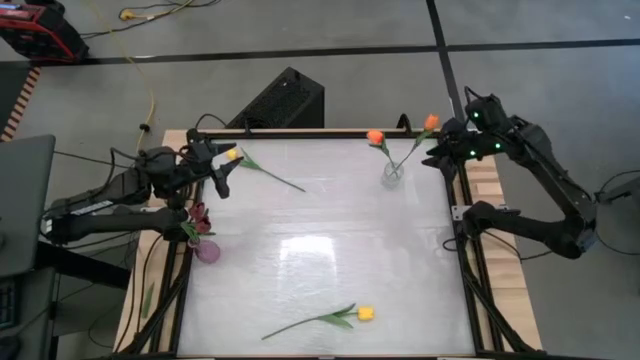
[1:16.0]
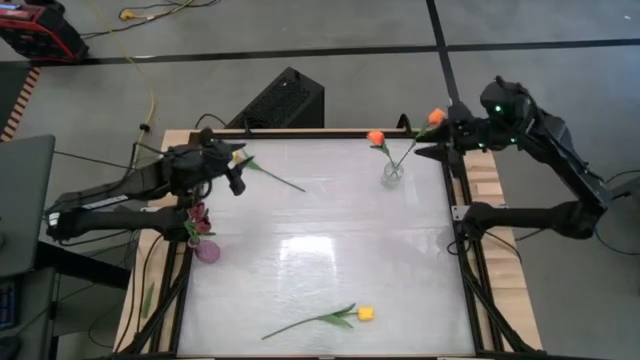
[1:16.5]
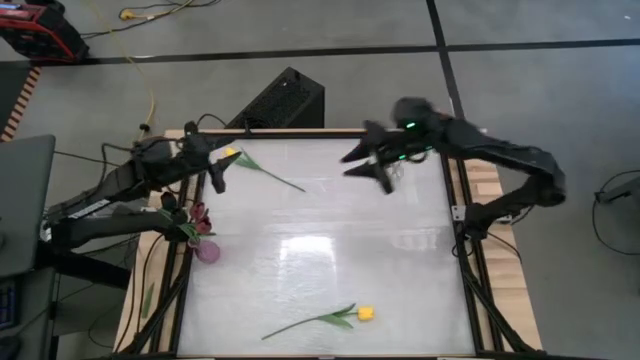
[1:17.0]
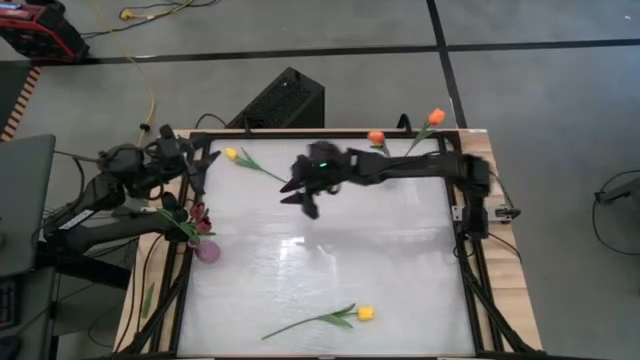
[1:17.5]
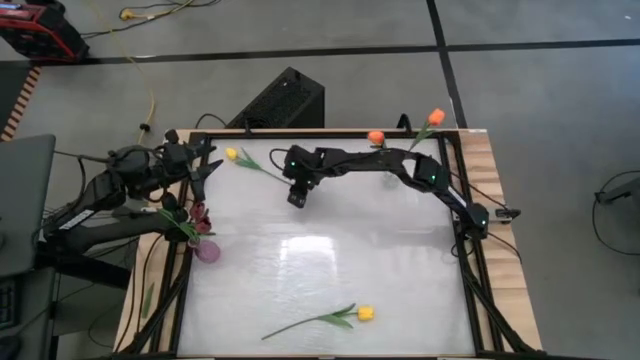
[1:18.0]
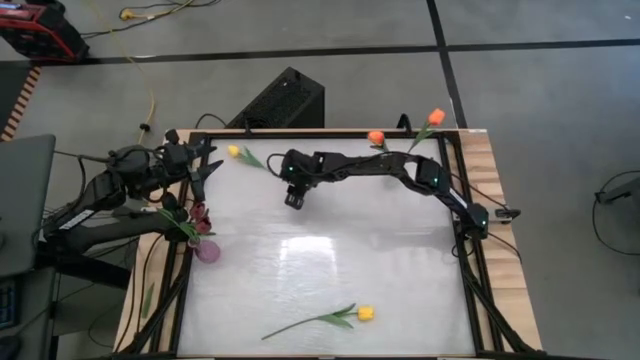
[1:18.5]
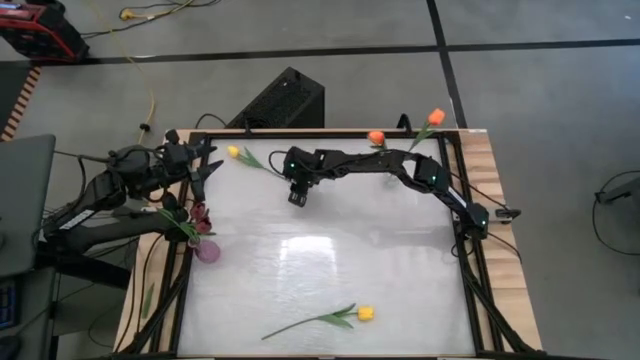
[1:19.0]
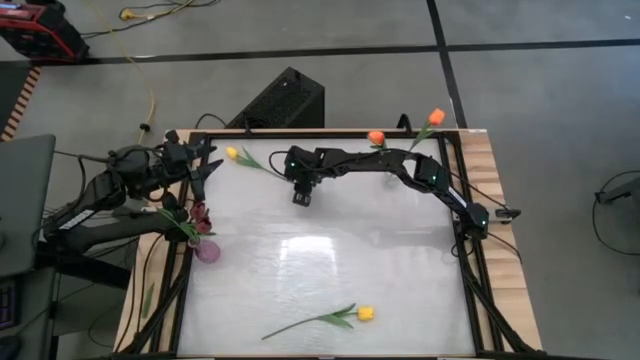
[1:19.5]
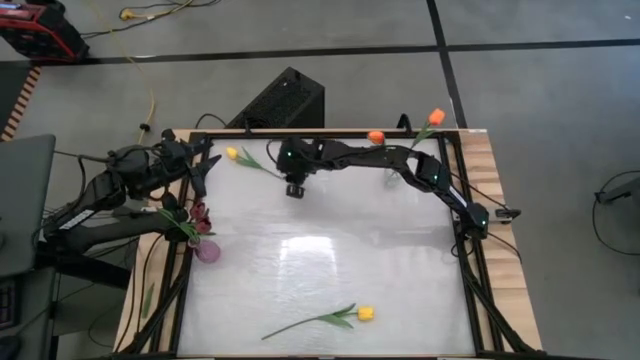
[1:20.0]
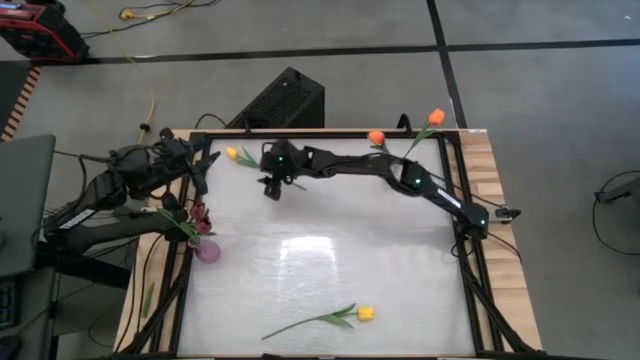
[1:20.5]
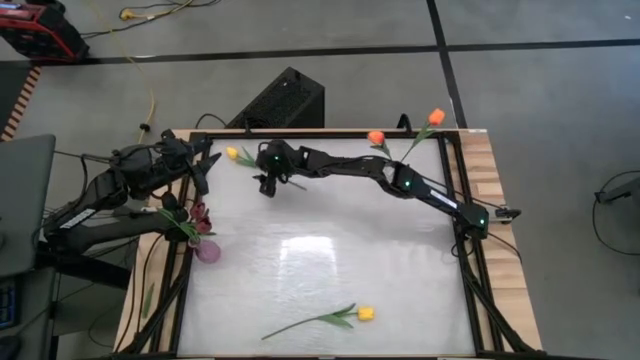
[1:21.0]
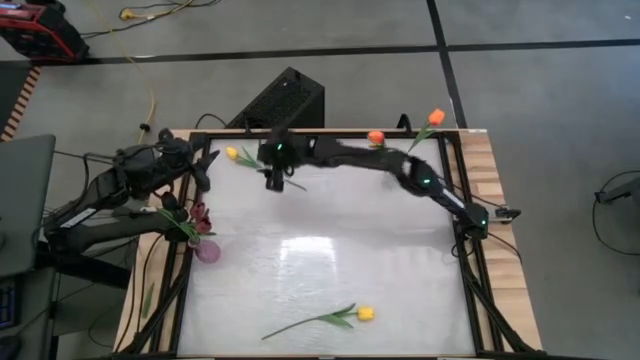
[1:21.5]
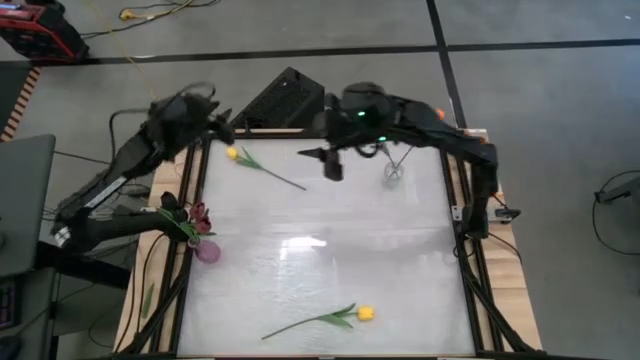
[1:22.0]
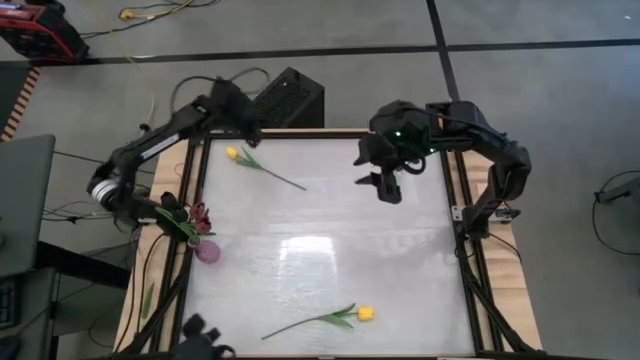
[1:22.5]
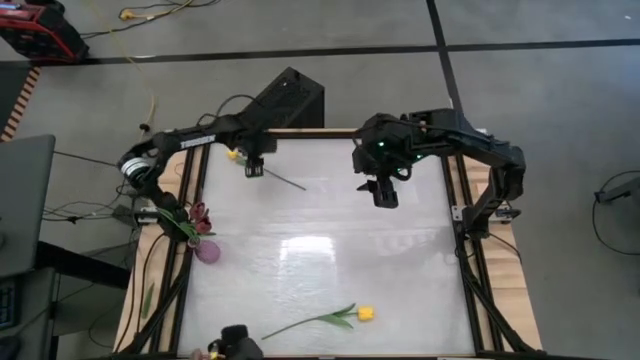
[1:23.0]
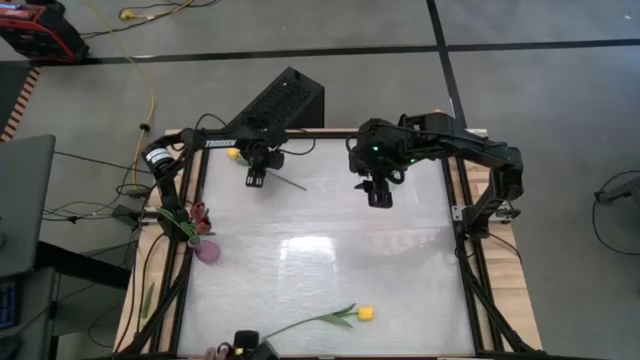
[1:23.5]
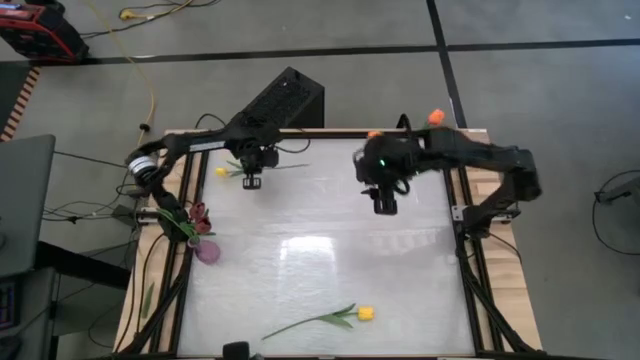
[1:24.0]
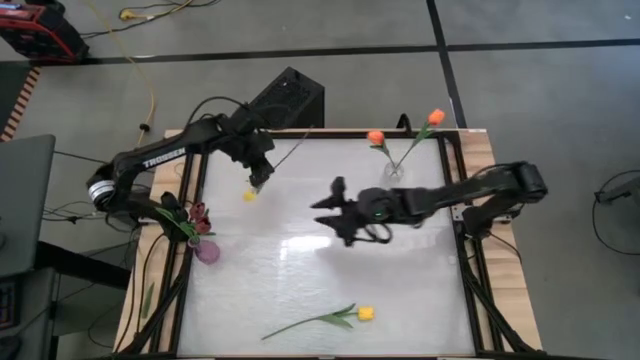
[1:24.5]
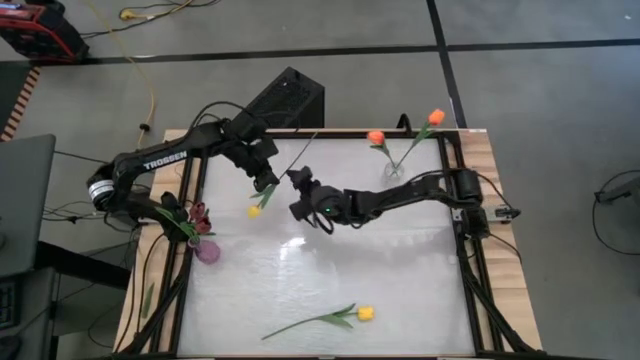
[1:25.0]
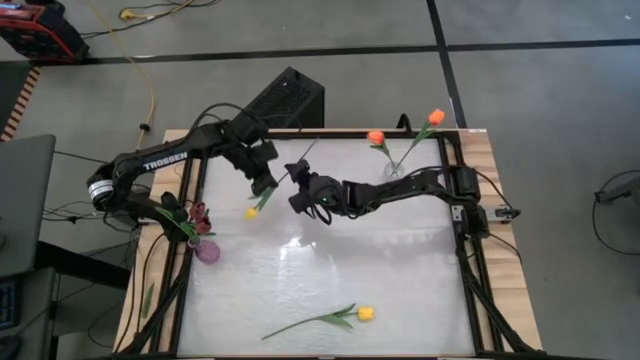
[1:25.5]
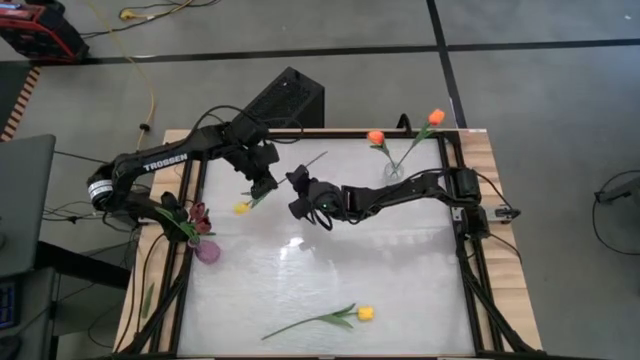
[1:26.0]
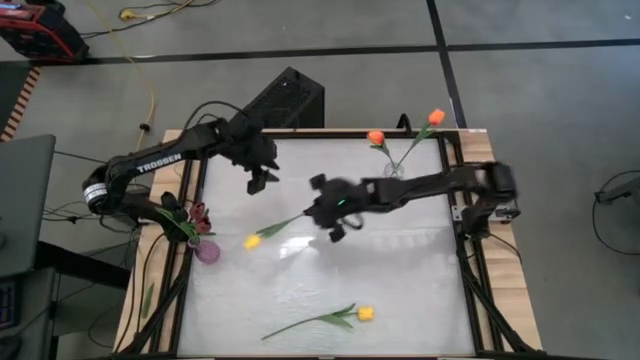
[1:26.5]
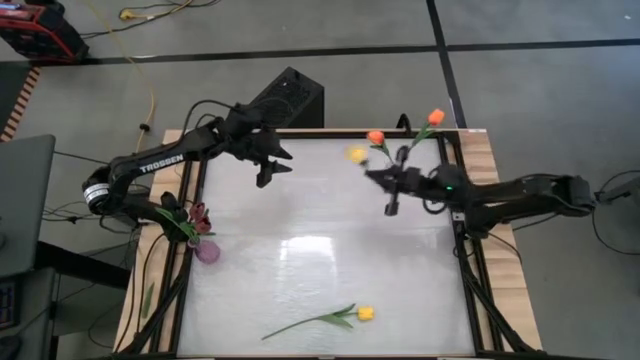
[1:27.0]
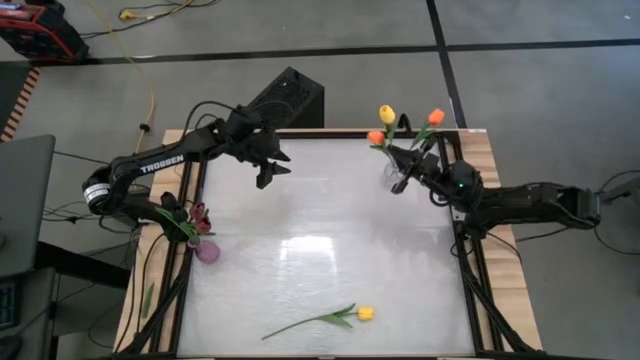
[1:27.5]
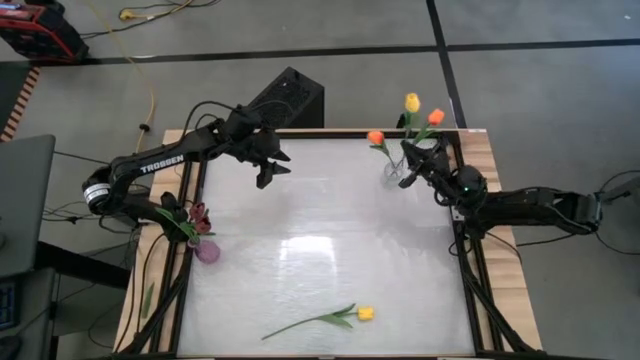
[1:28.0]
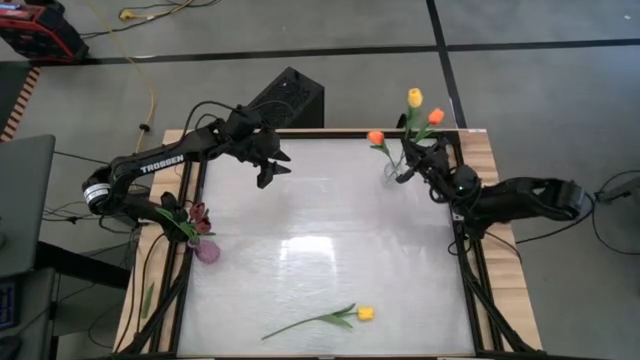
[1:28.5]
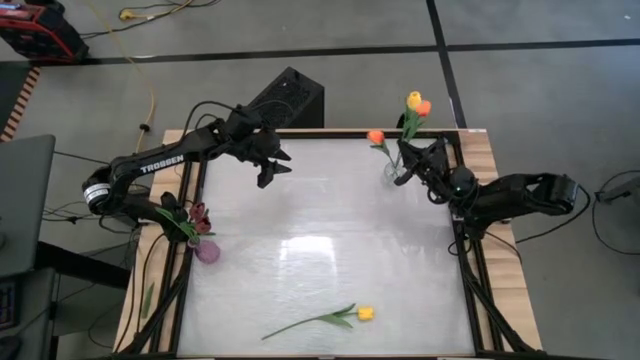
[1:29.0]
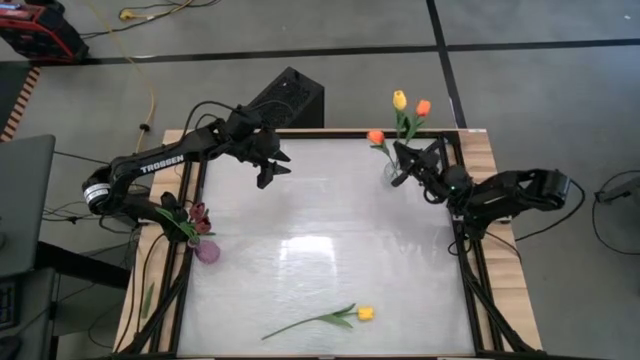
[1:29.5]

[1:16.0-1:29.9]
Task: Sort flowers into vase by color
Put the top yellow tulip into the transparent vase

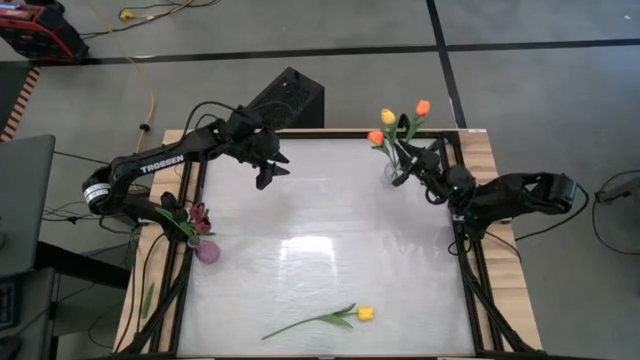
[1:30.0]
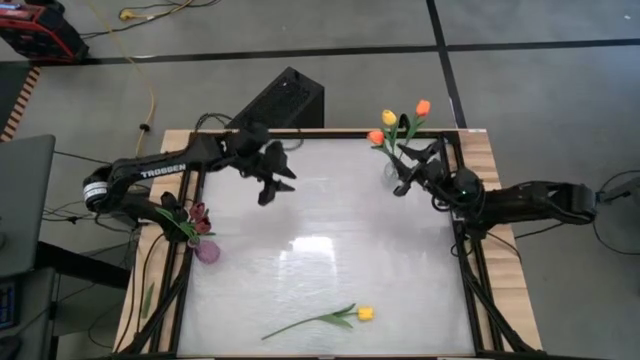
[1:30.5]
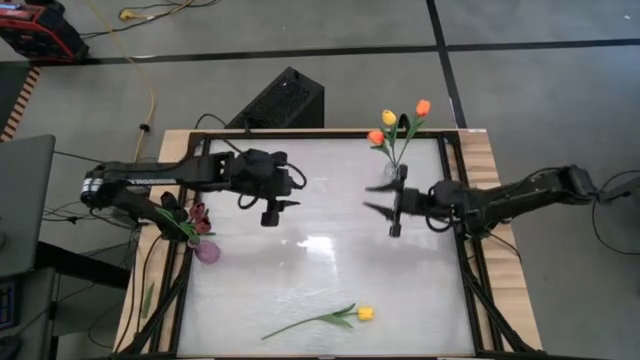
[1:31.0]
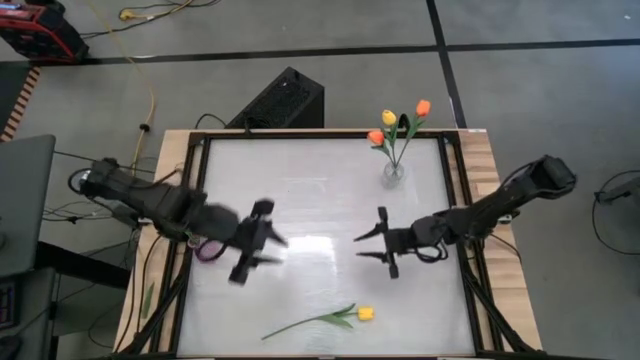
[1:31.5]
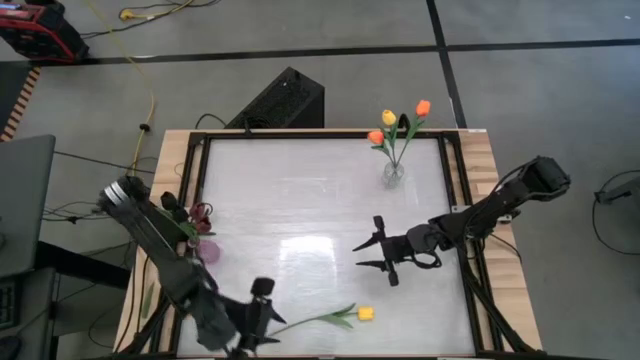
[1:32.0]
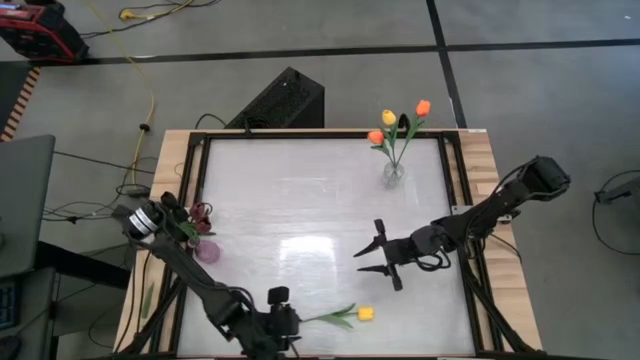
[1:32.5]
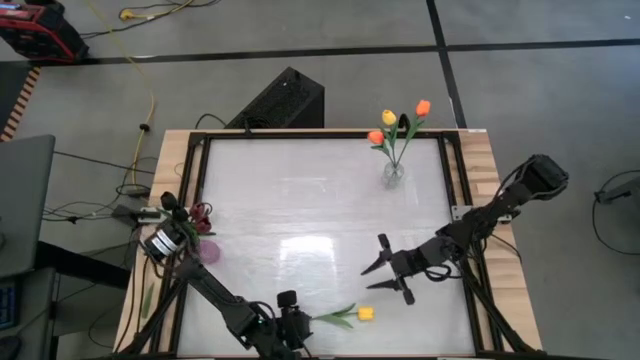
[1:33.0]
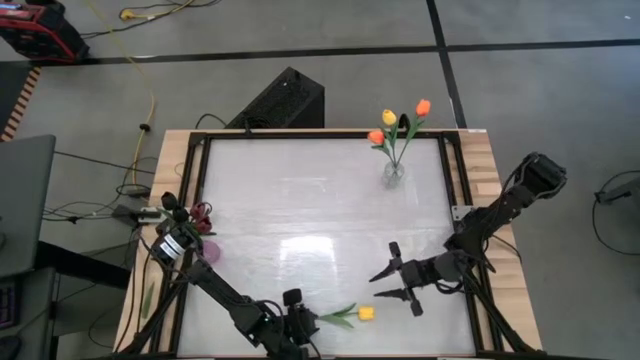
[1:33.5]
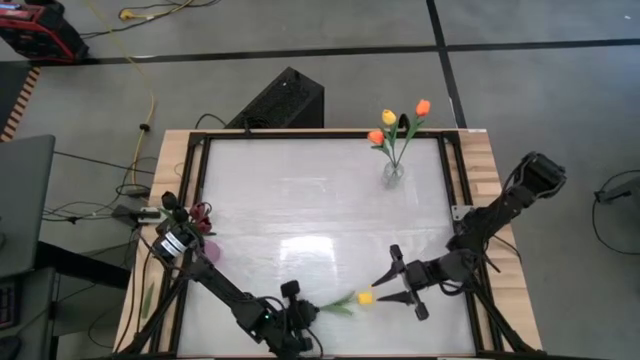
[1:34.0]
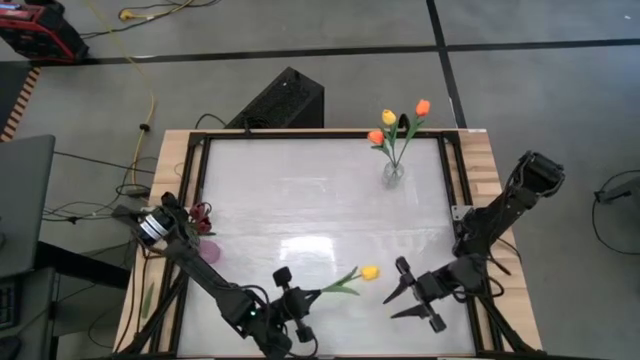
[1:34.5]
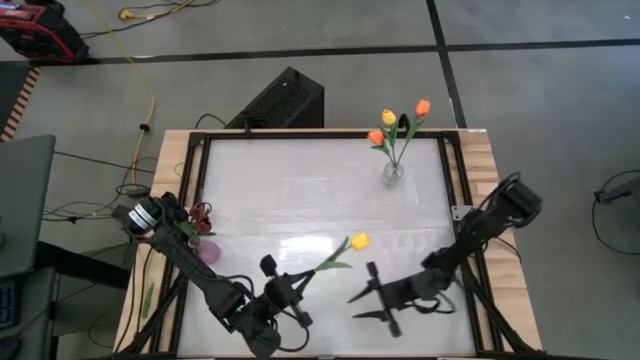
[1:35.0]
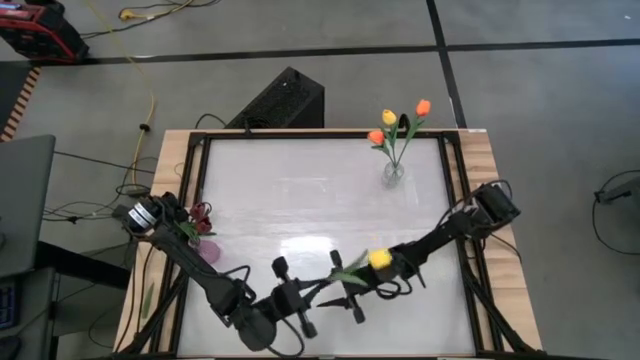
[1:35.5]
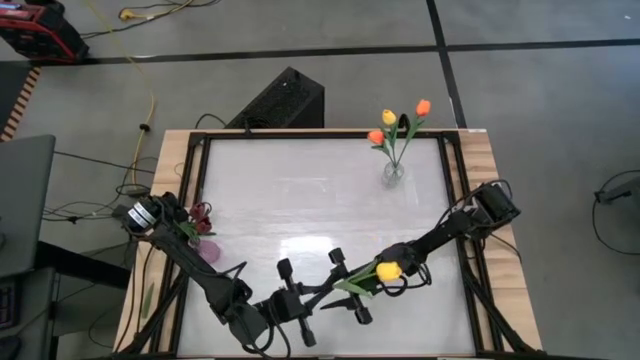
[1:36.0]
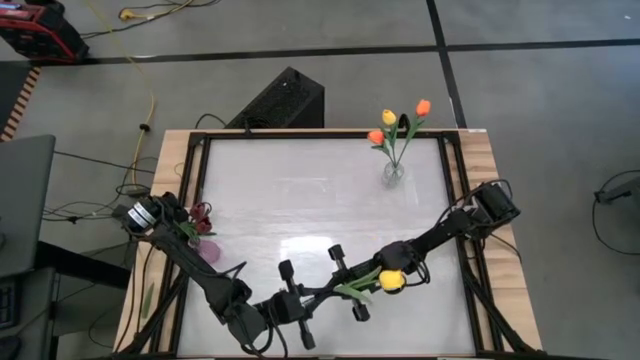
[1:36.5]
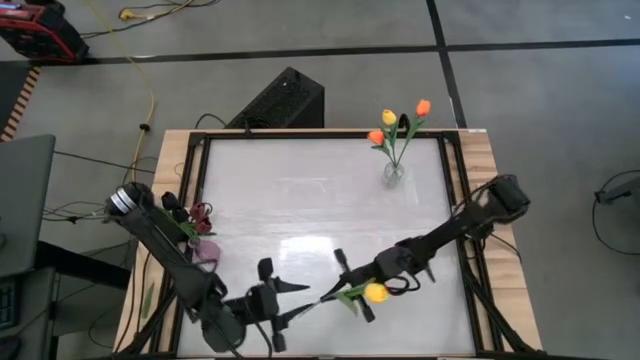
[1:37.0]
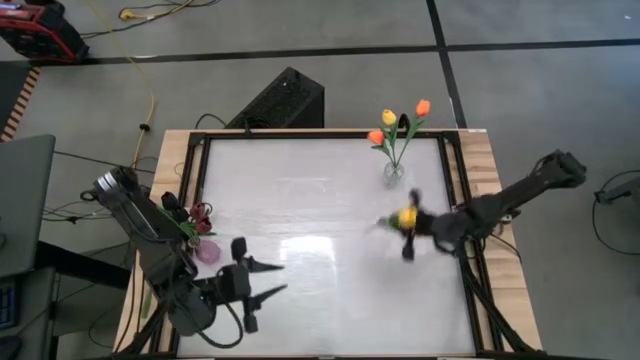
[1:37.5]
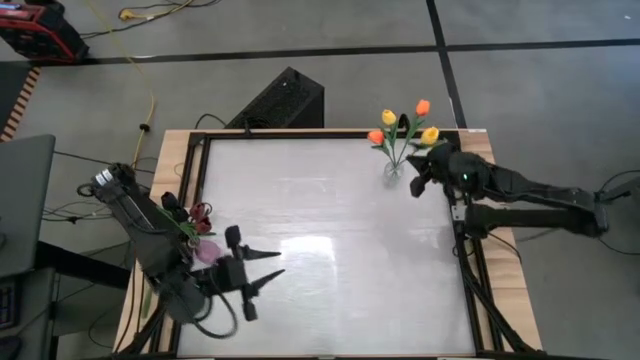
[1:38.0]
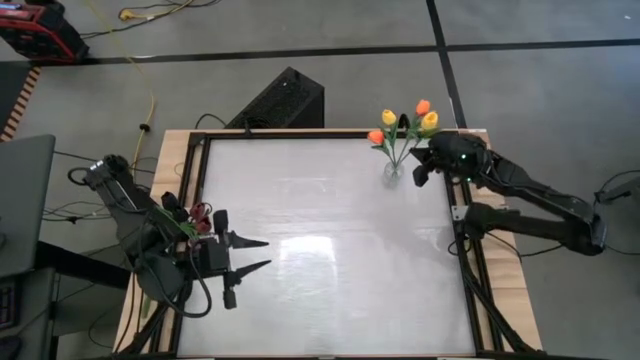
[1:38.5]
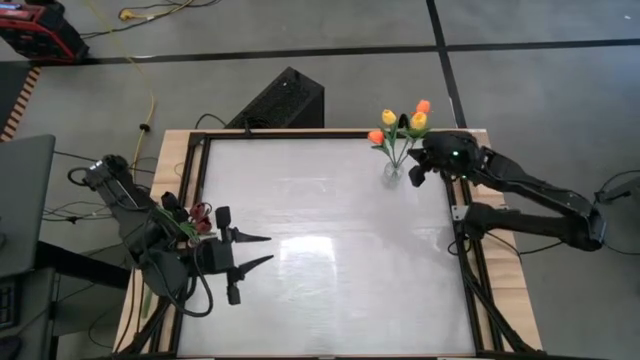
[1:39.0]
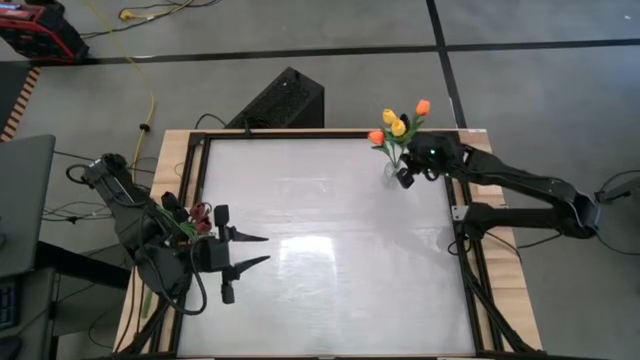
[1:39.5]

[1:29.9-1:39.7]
Put the yellow tulip into the transparent vase
